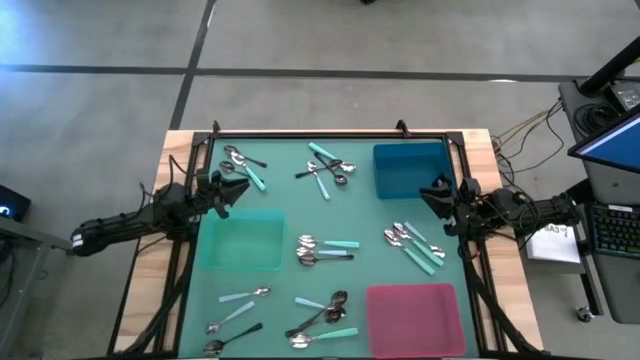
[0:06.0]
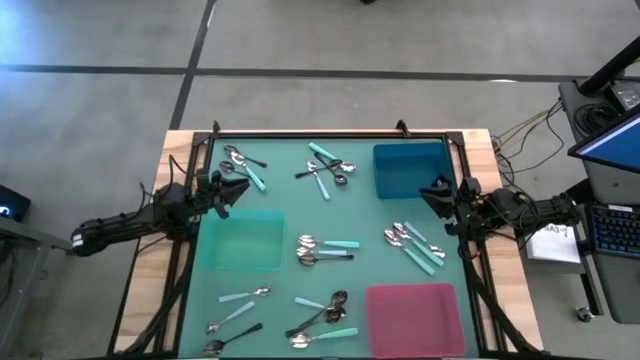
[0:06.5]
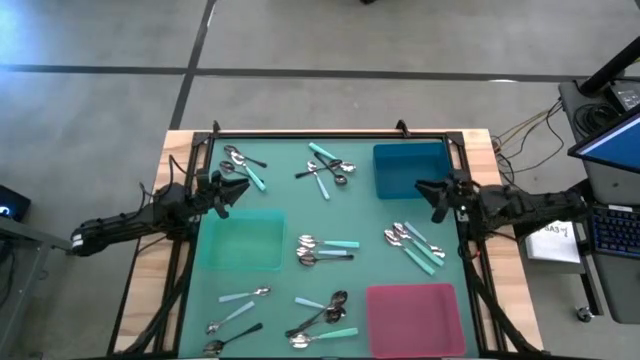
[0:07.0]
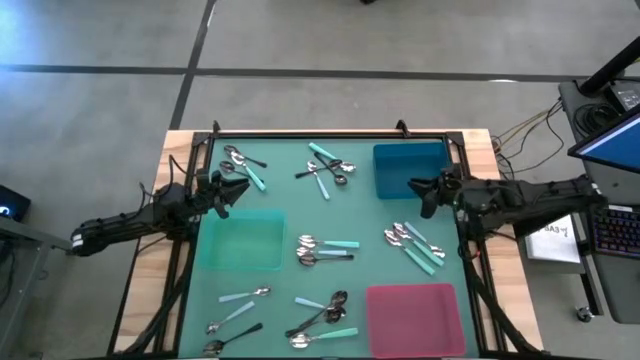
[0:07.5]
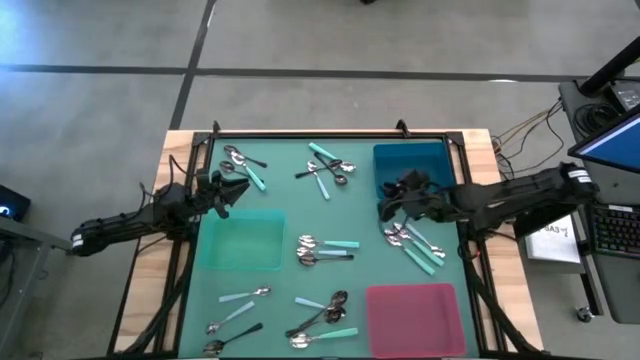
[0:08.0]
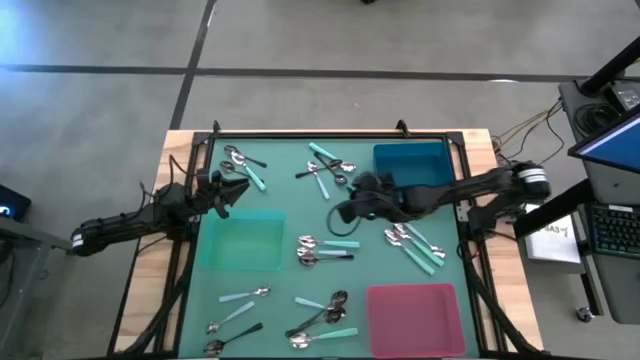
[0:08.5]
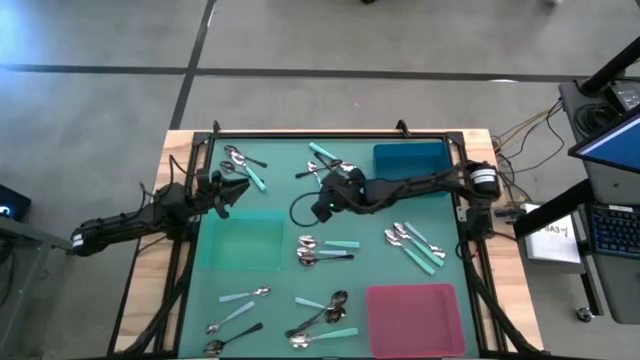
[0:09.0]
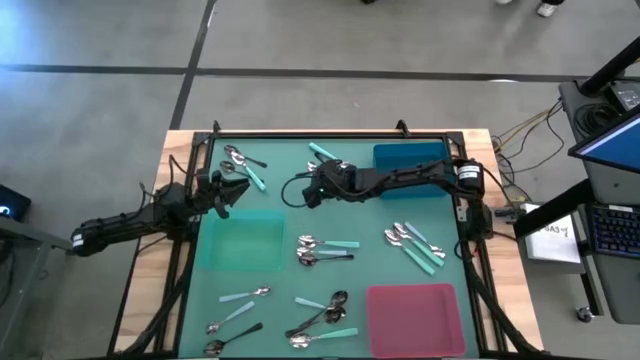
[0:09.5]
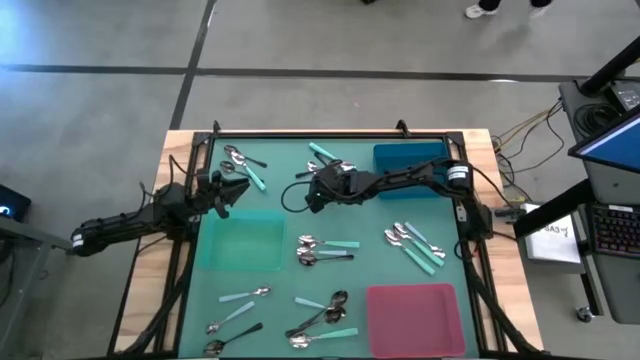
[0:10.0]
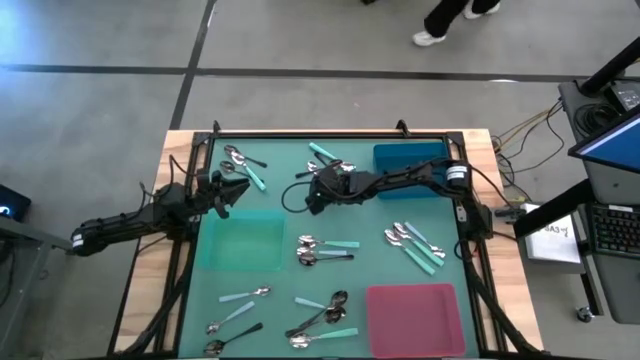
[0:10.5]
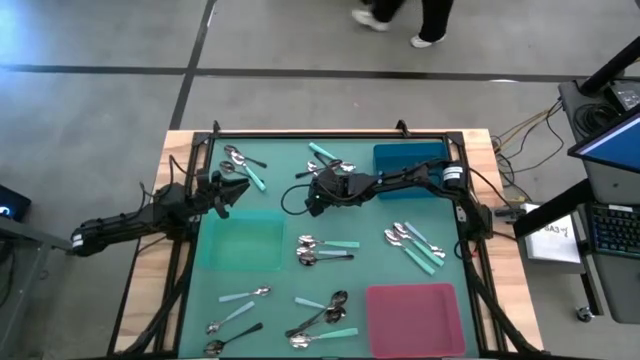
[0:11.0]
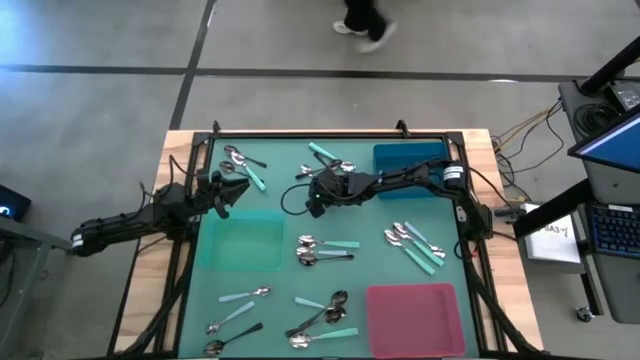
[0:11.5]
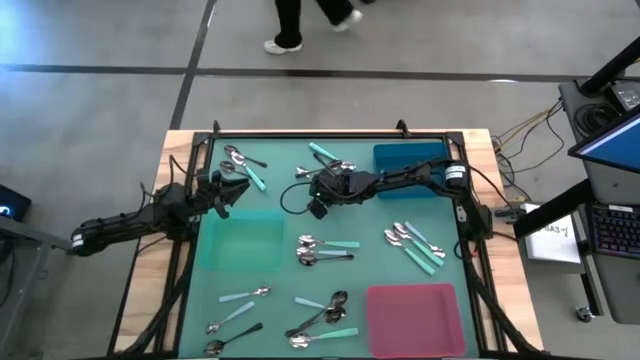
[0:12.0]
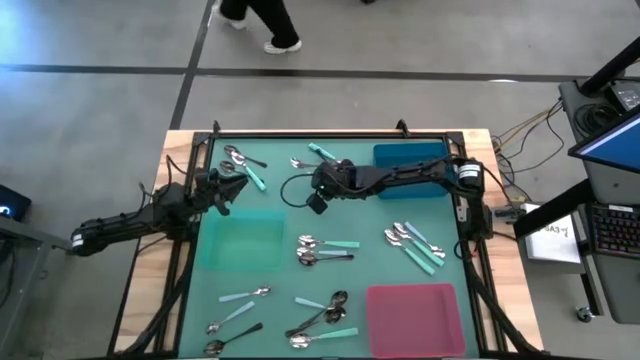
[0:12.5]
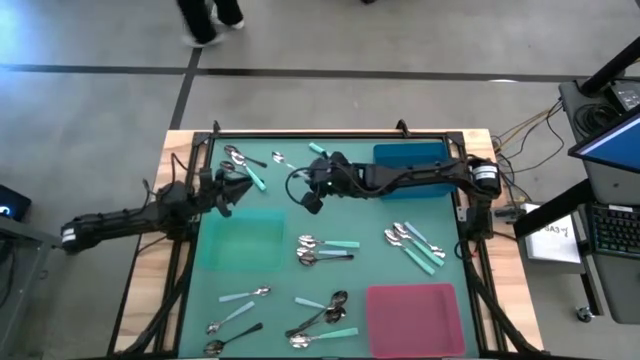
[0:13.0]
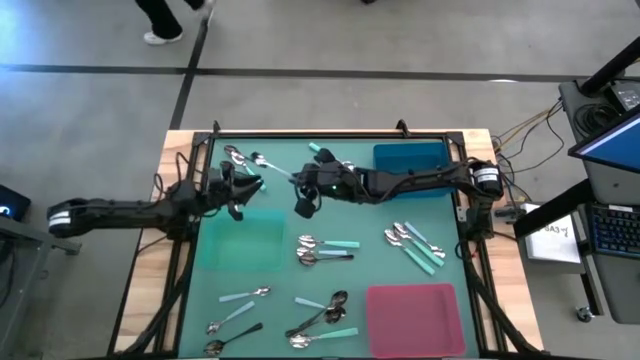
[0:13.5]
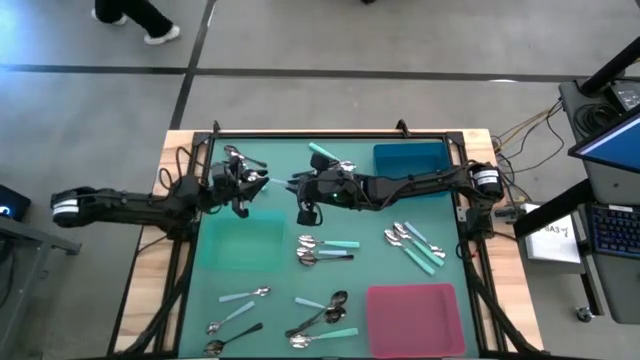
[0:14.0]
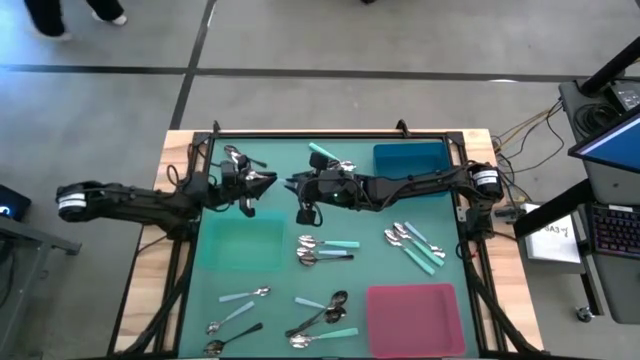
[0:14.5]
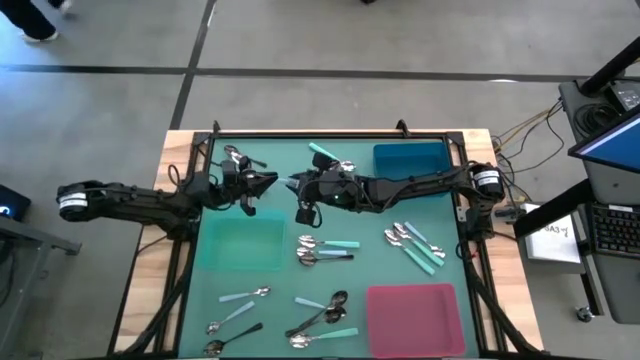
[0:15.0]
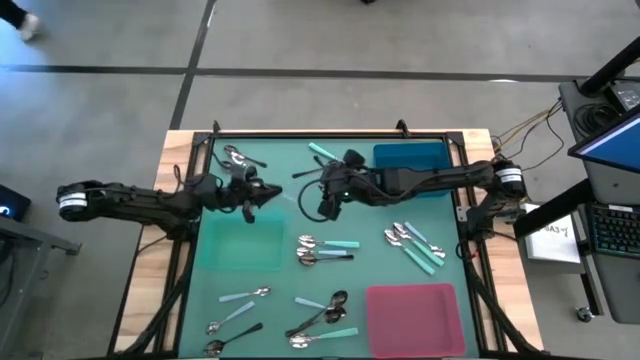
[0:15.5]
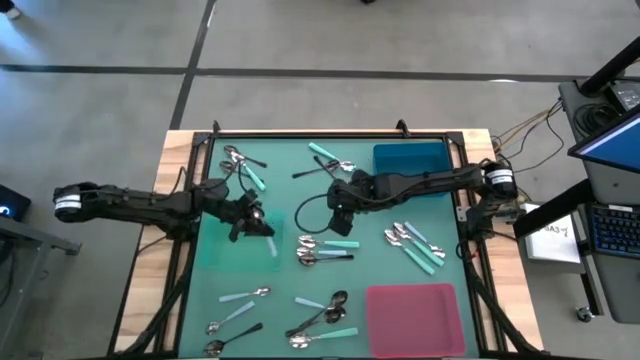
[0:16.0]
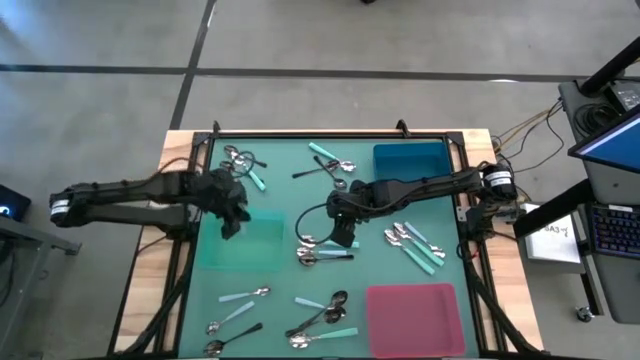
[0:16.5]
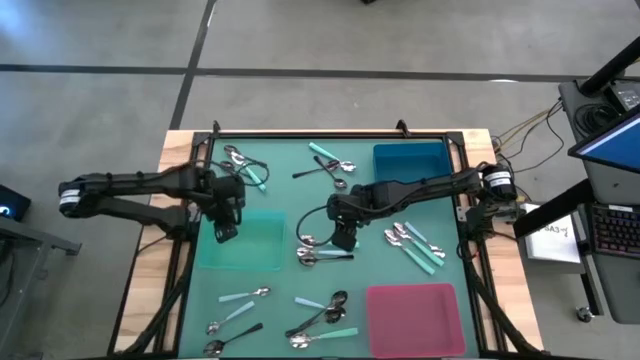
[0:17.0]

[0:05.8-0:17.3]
Task: Sort silverware by color (type)
Put the blue spoon into the green bin

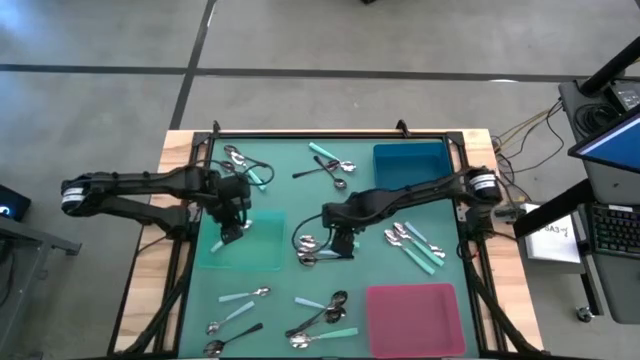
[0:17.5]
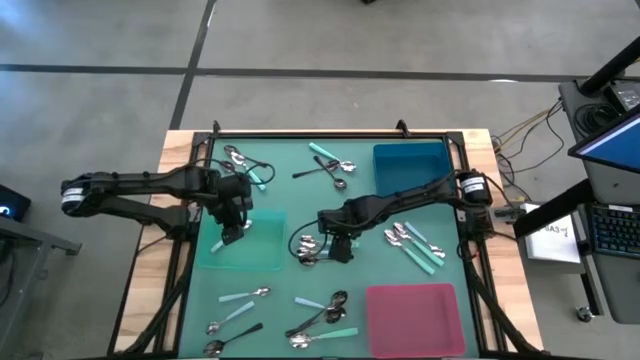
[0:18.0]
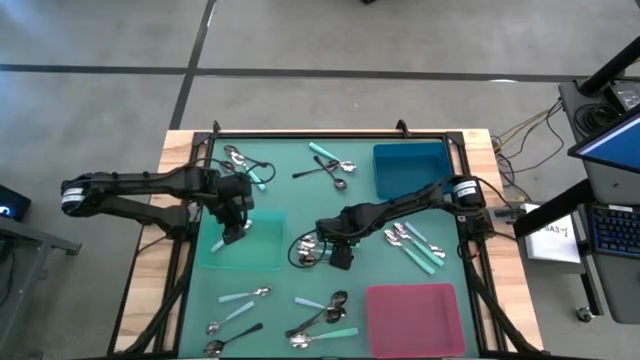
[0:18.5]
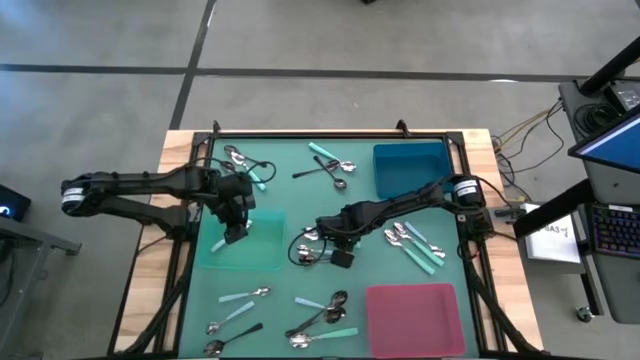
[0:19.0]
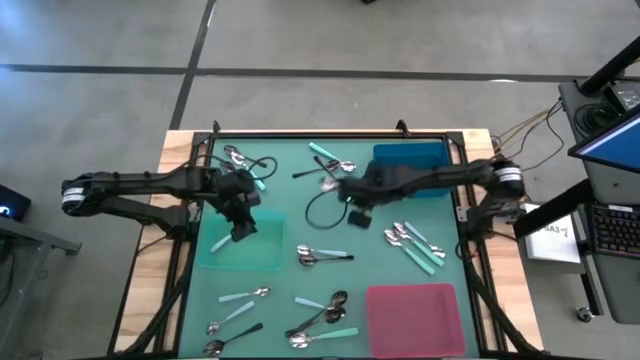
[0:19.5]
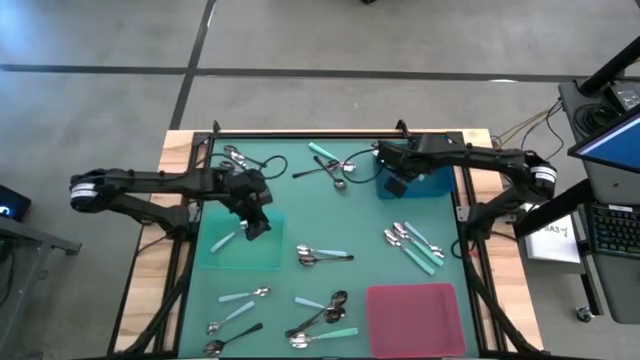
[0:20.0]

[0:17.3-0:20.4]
Put the green spoon into the blue bin

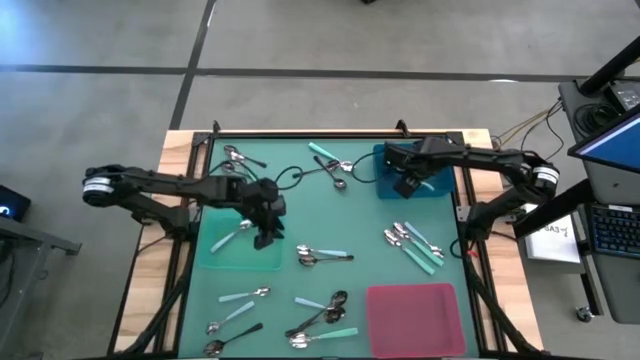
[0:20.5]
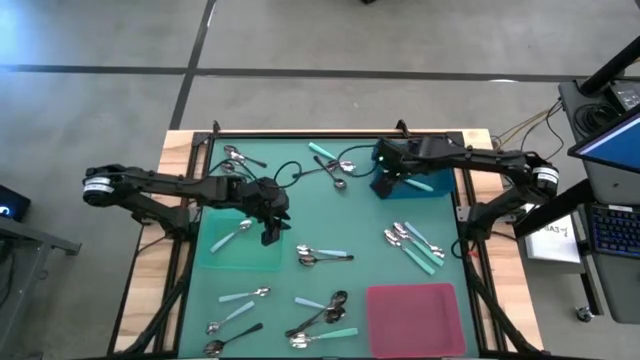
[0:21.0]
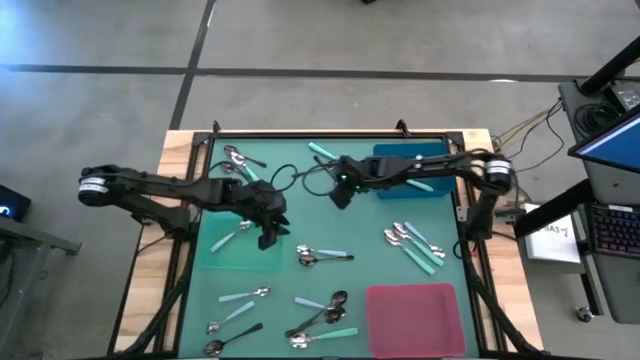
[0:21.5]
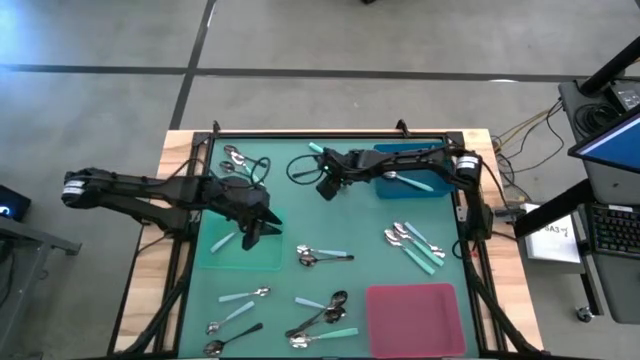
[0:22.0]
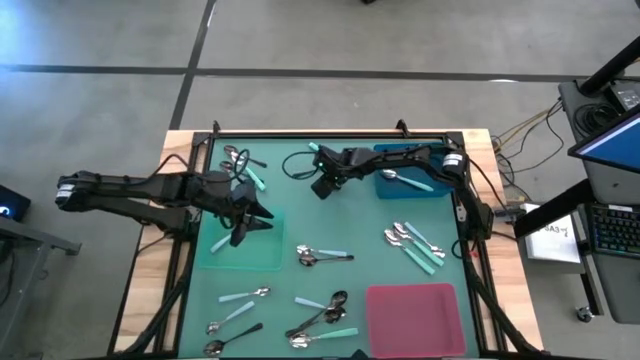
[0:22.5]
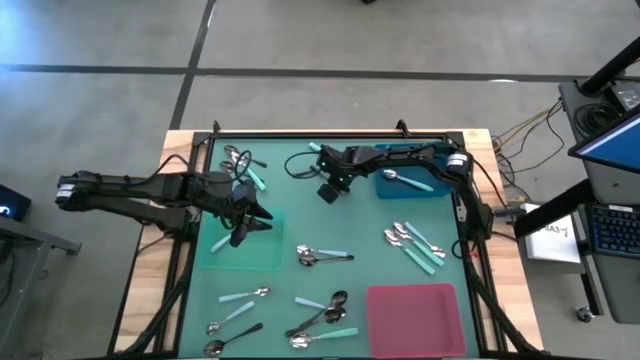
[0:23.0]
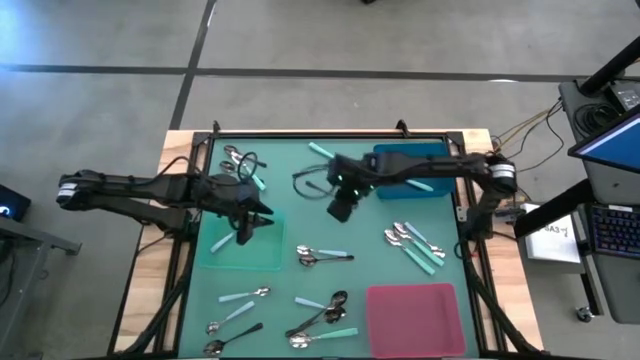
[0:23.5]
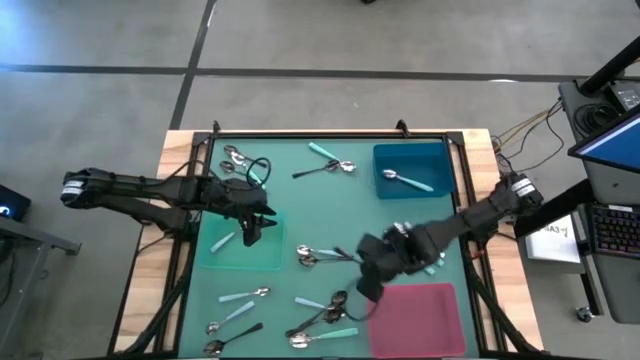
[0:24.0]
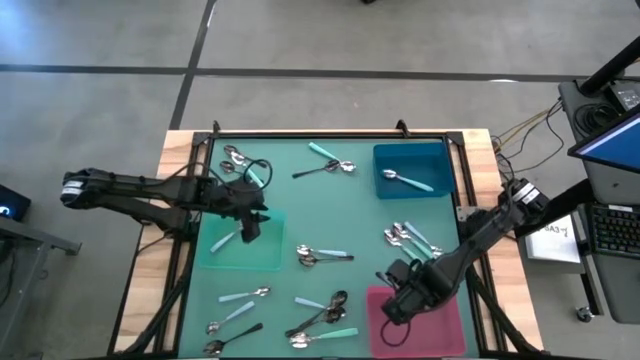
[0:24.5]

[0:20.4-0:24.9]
Put the black spoon into the red bin

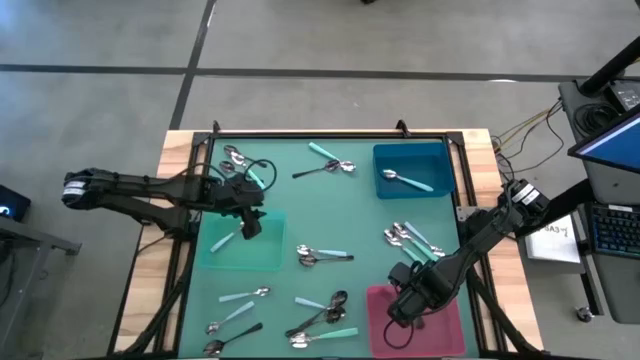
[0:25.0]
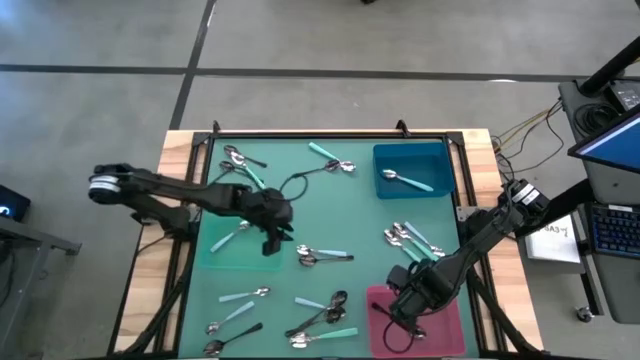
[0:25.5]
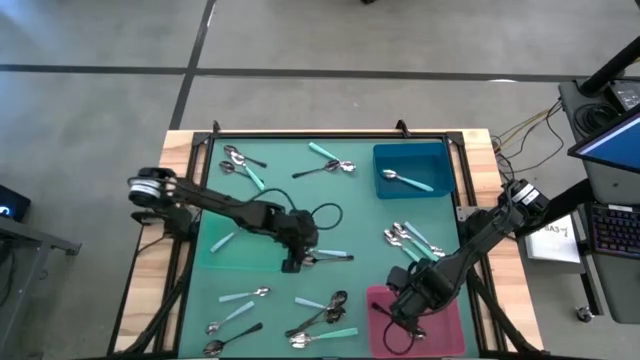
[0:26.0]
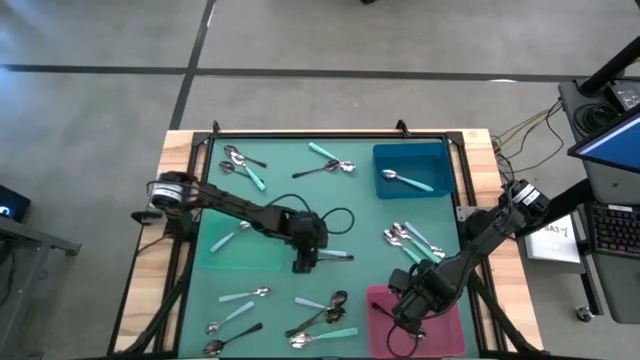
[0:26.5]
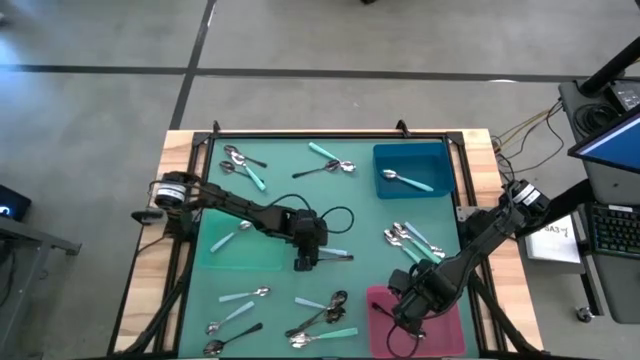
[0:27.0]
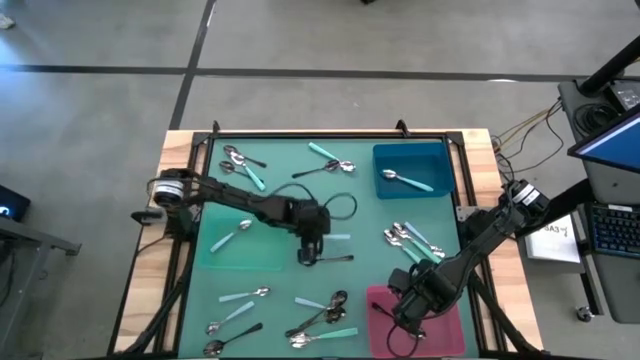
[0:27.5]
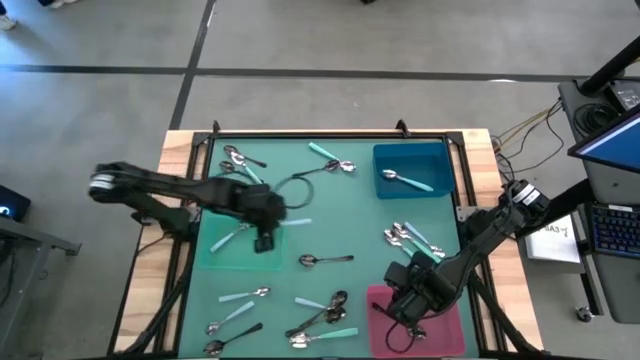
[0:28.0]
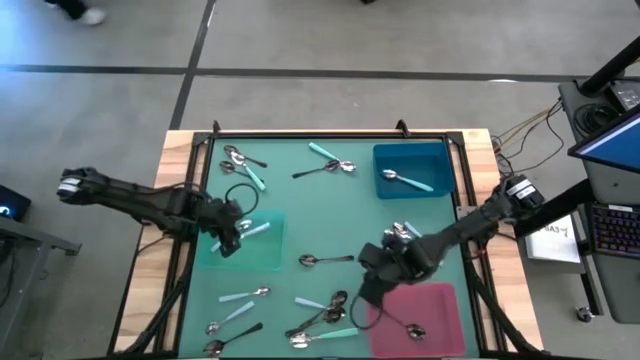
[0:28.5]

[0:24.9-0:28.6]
Put the blue spoon into the green bin
